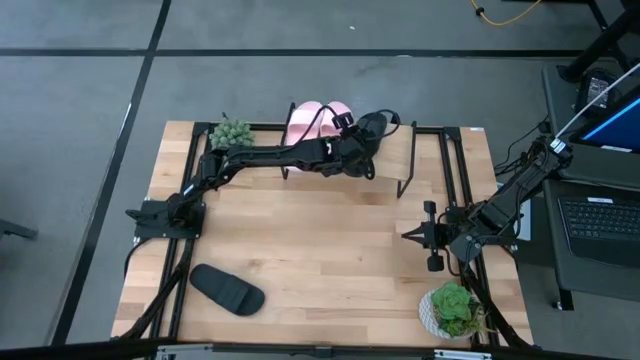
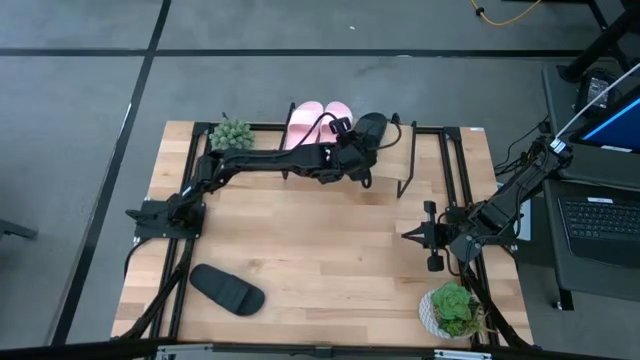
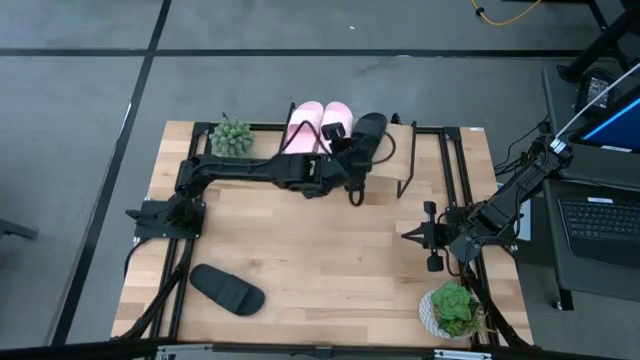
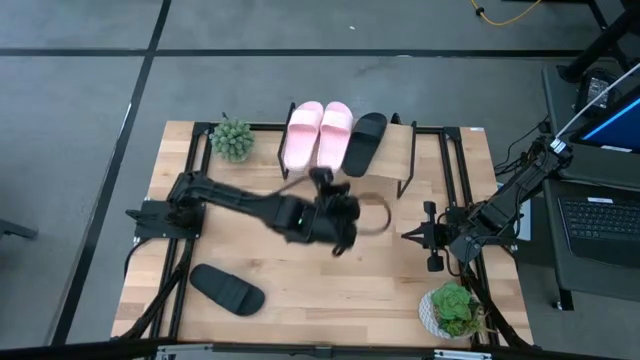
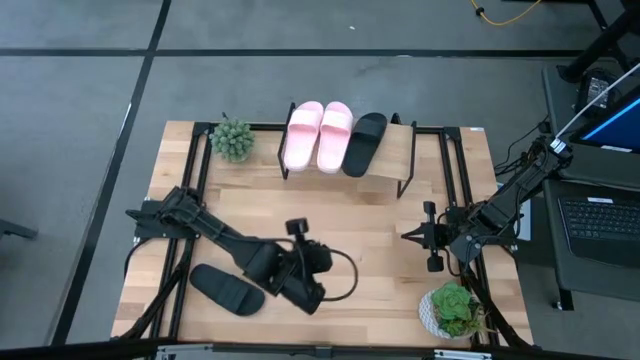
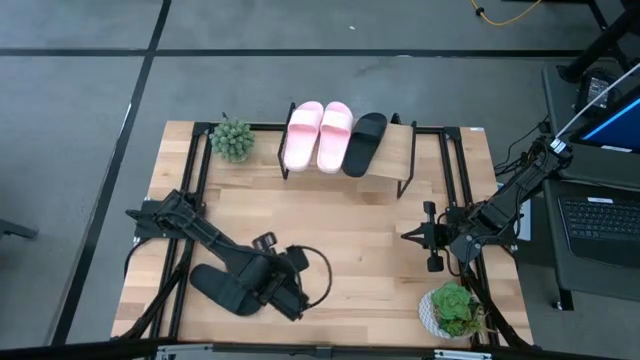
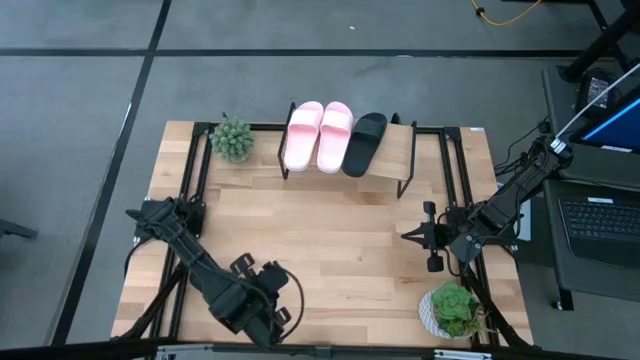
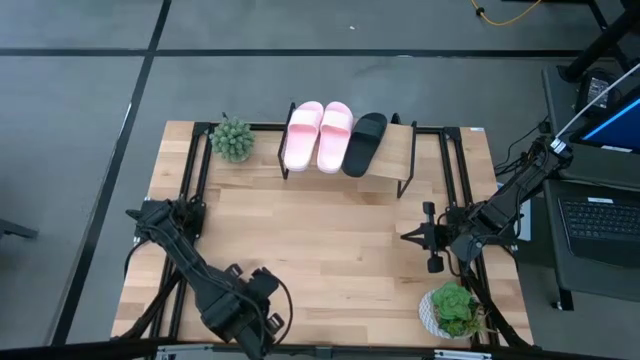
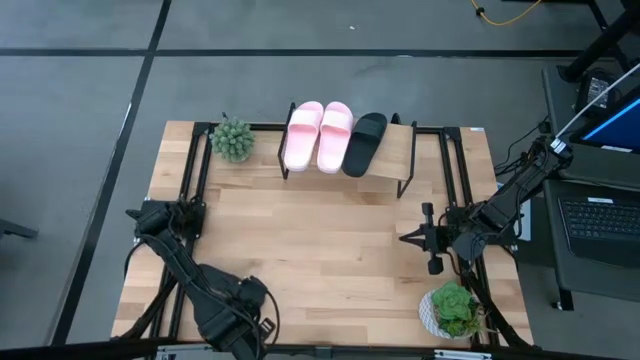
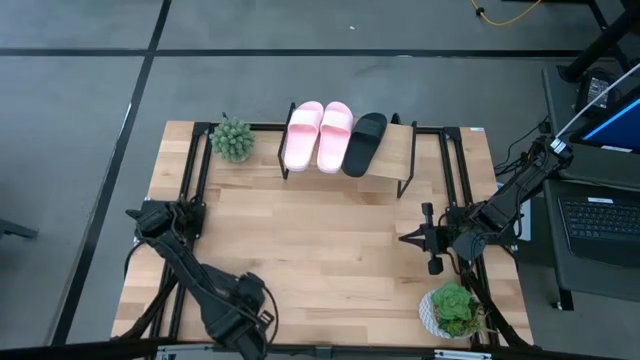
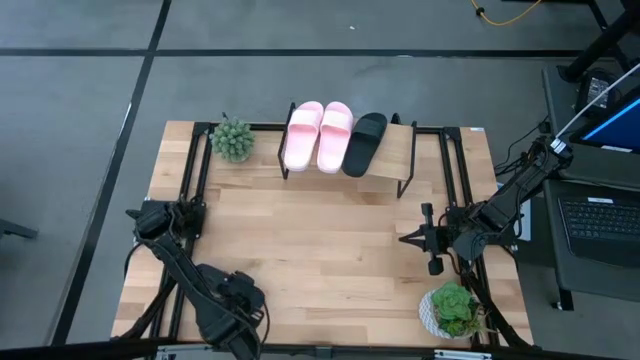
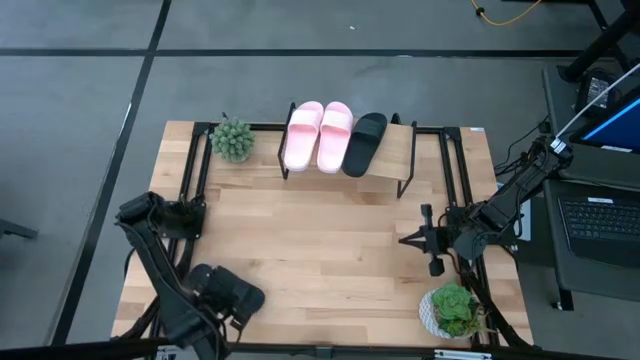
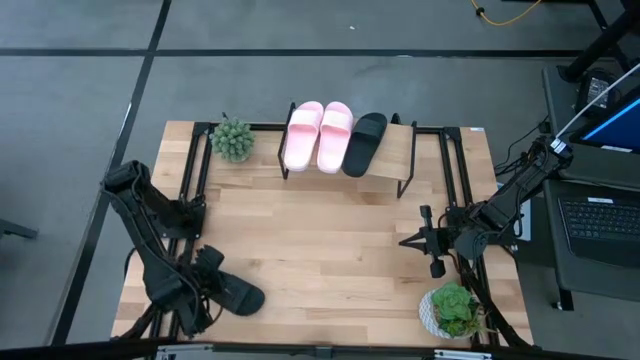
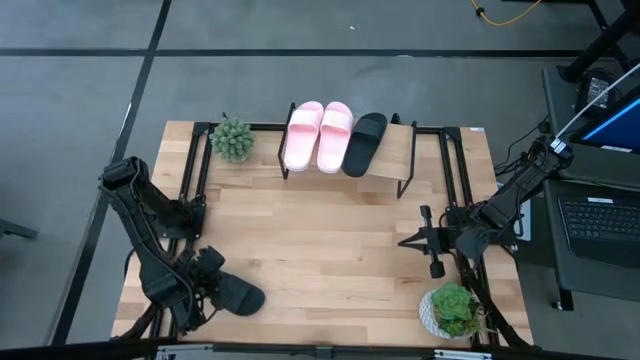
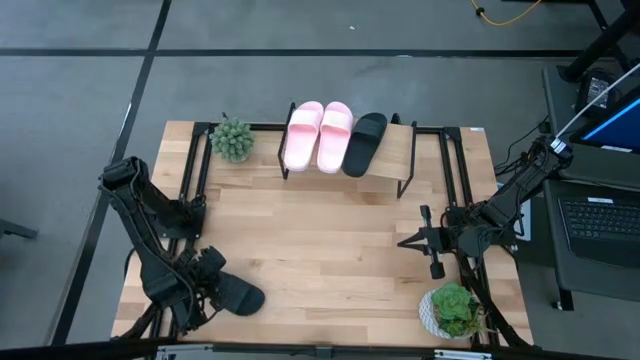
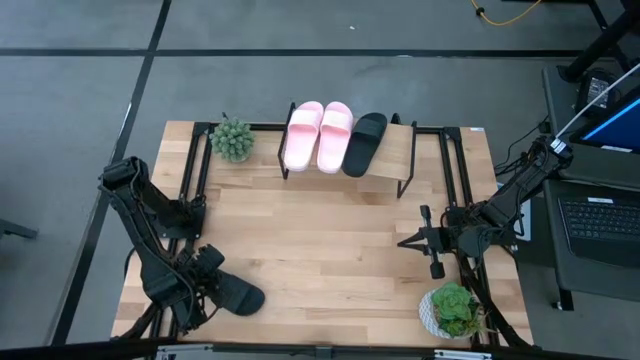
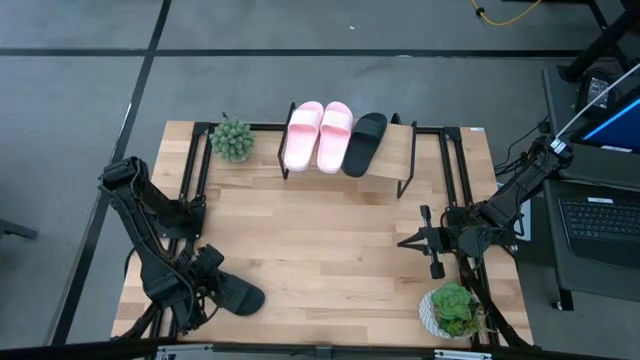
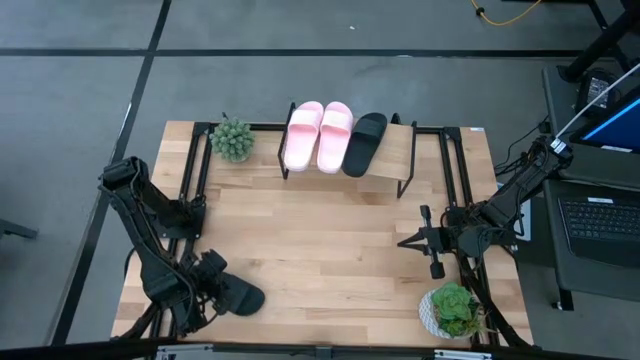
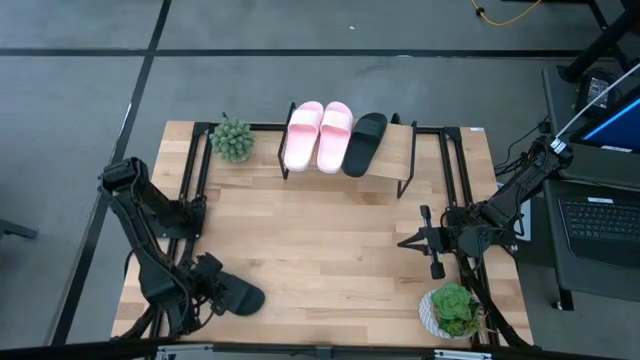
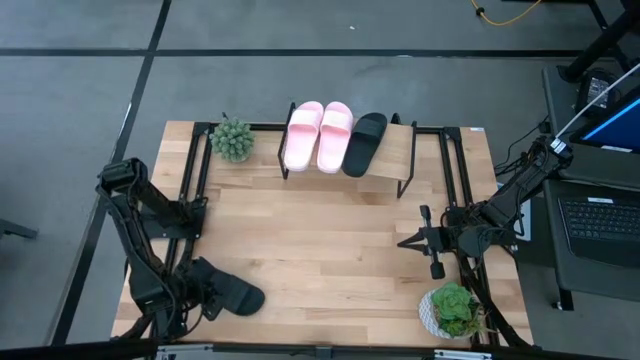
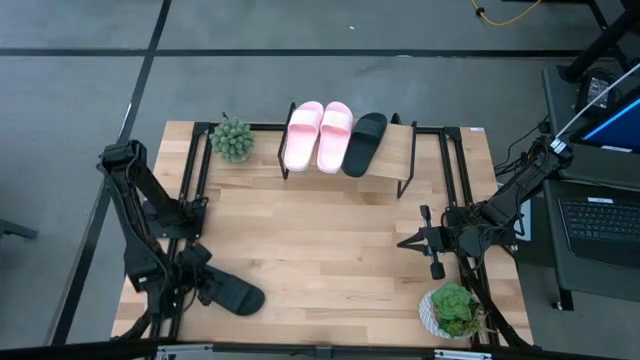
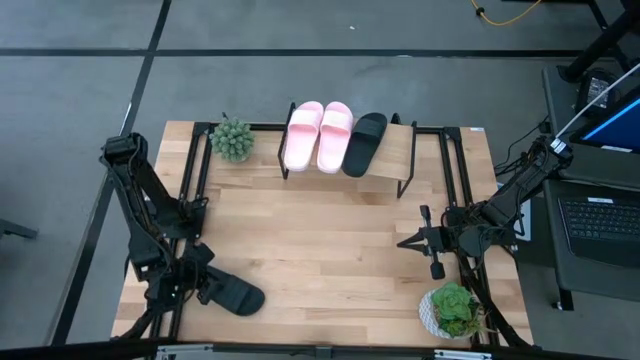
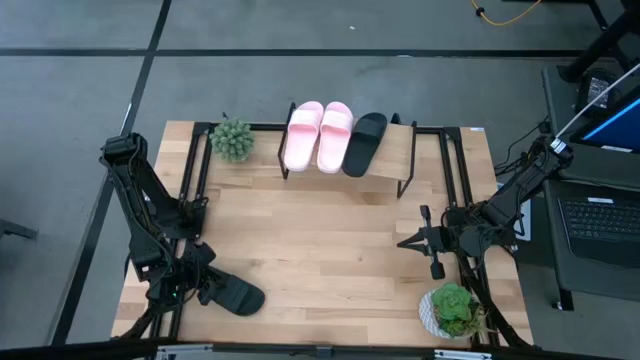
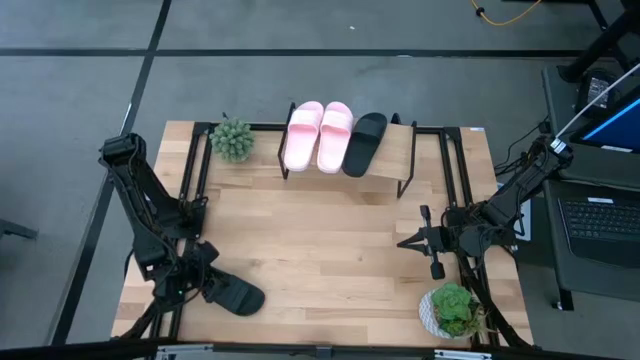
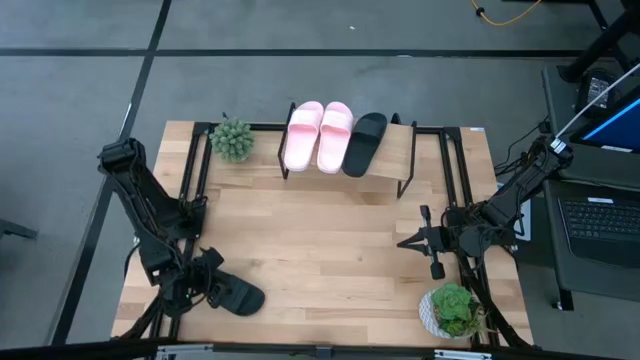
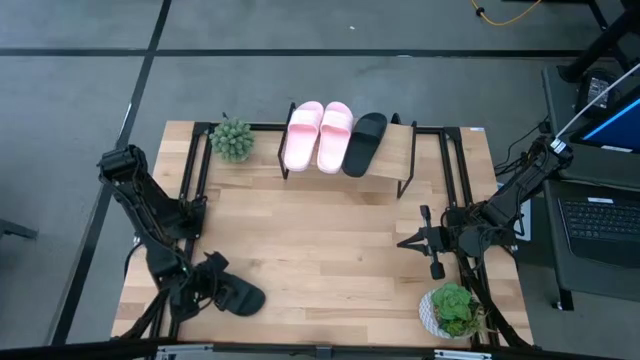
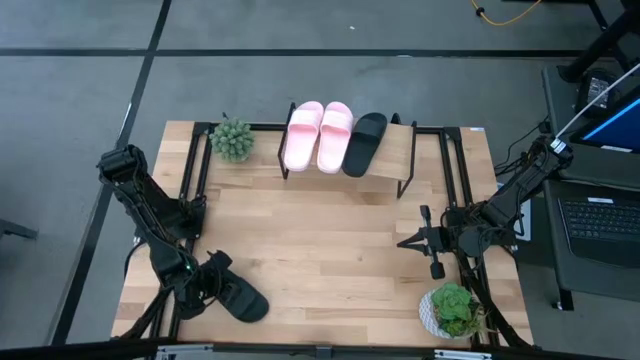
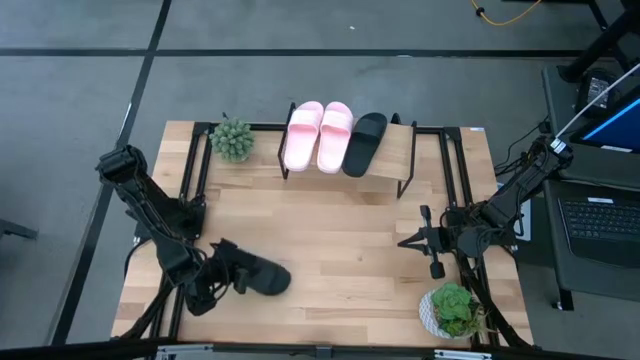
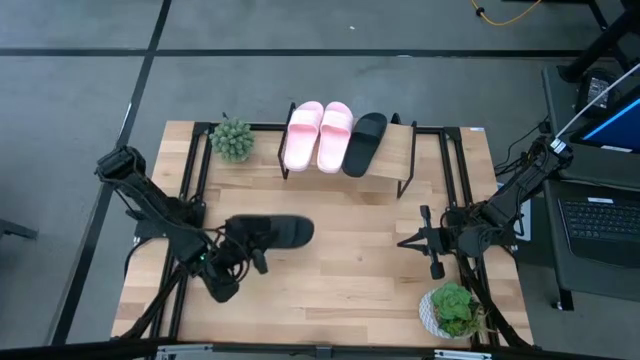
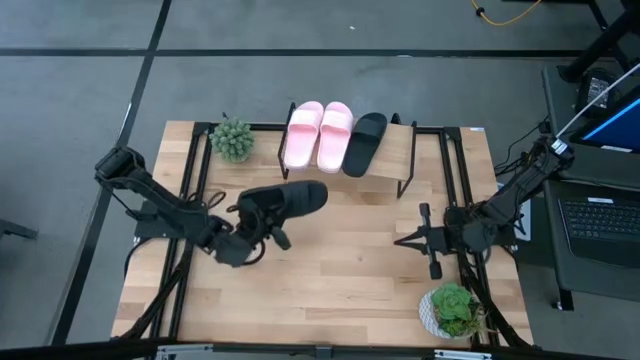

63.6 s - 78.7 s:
Task: Pick and place slides into the shelf
Put the black slipper on the shelf

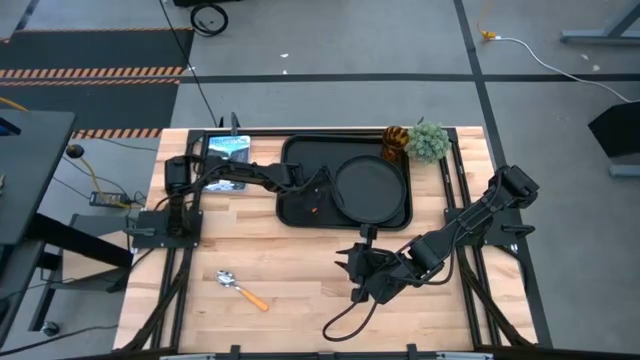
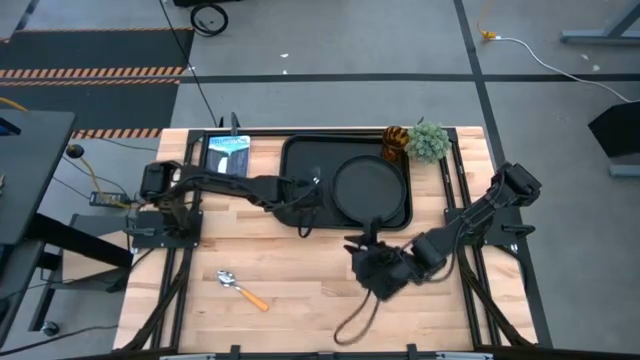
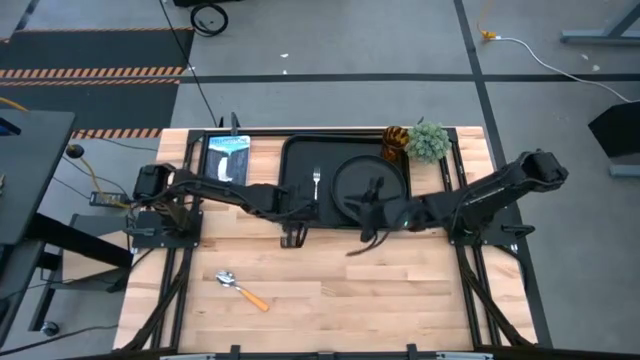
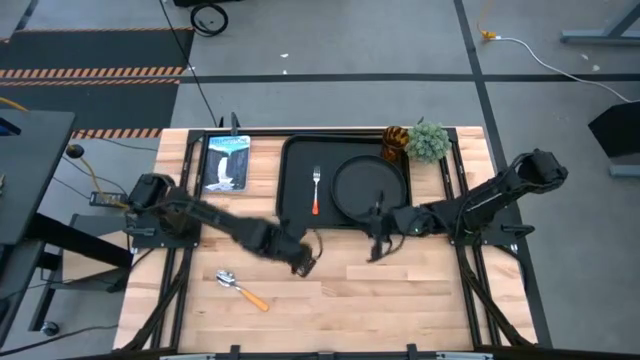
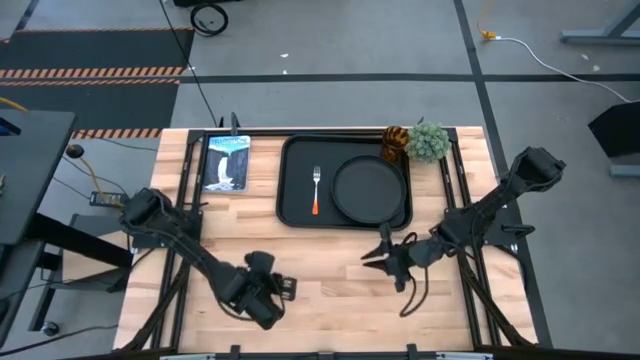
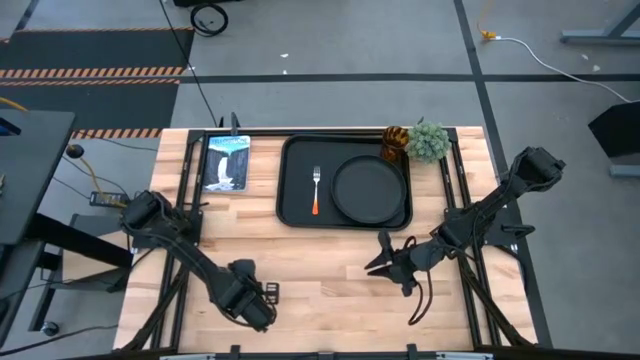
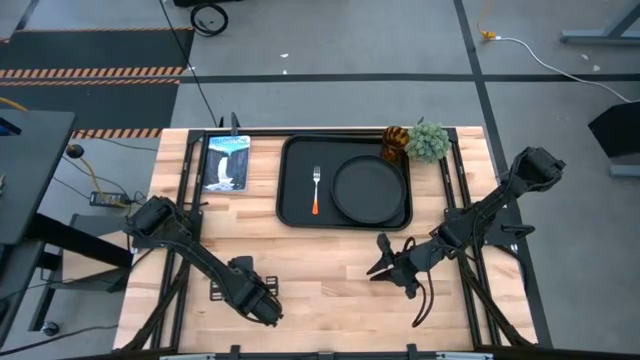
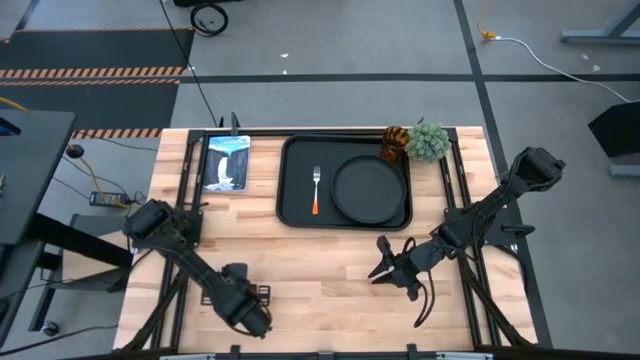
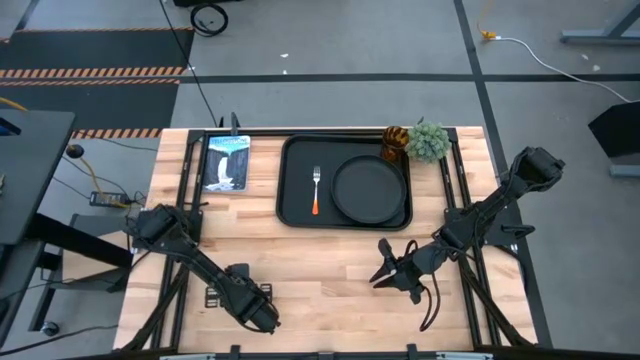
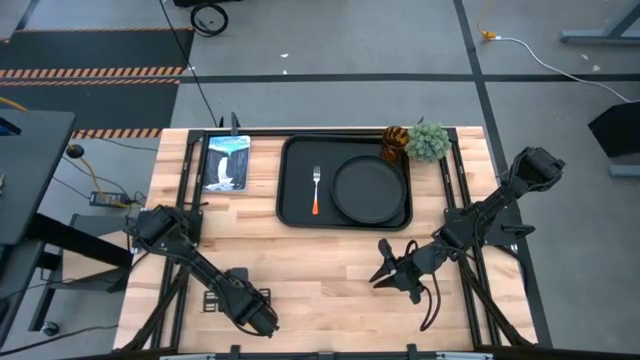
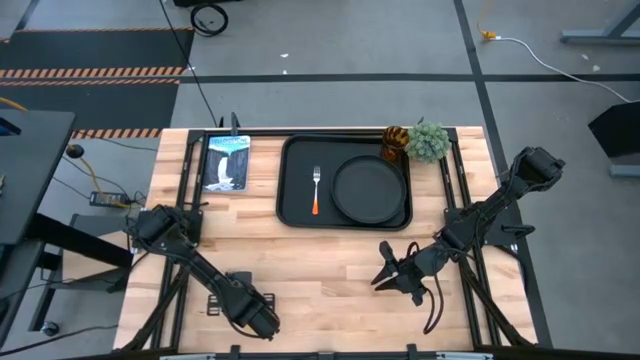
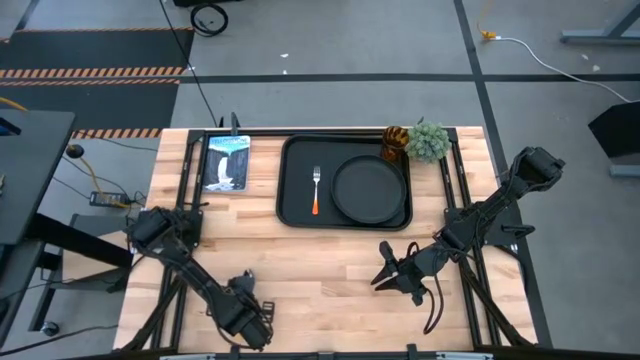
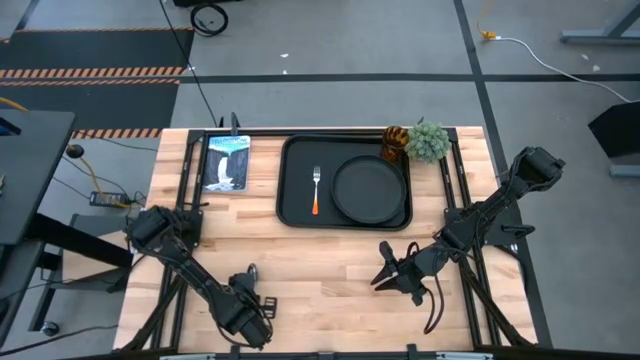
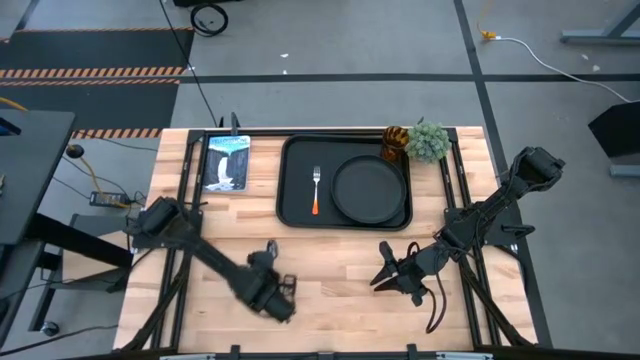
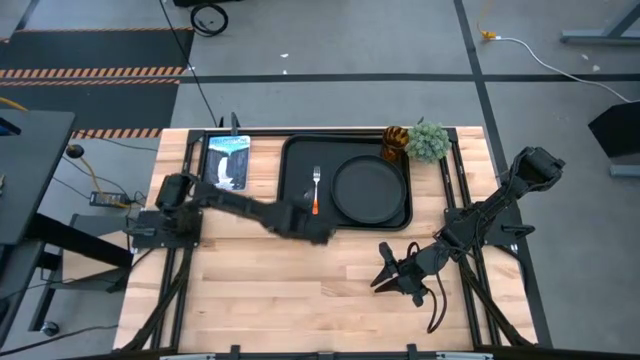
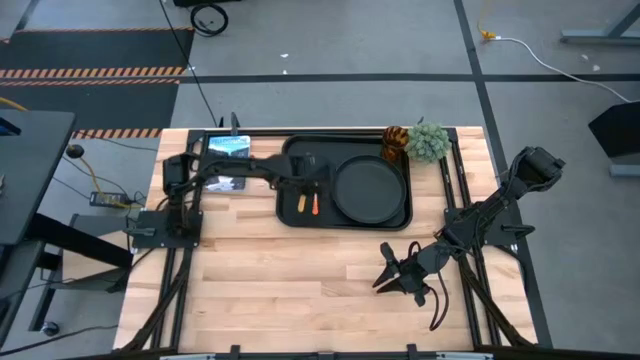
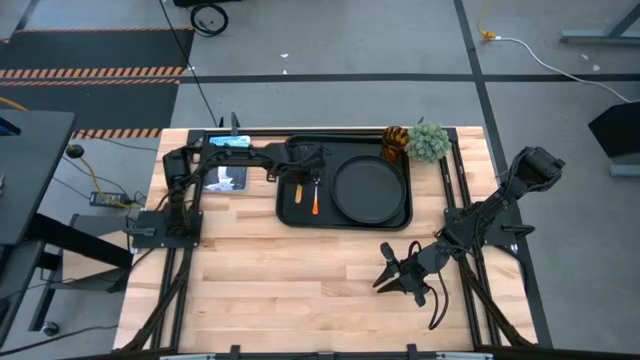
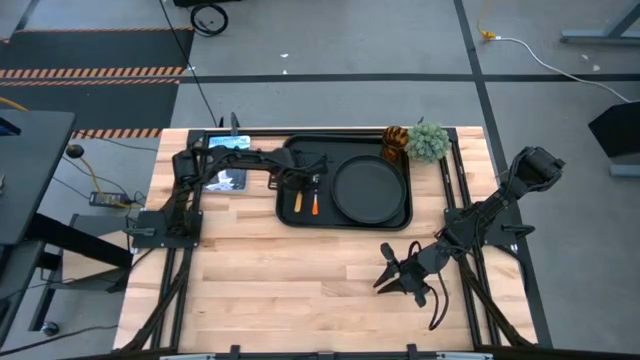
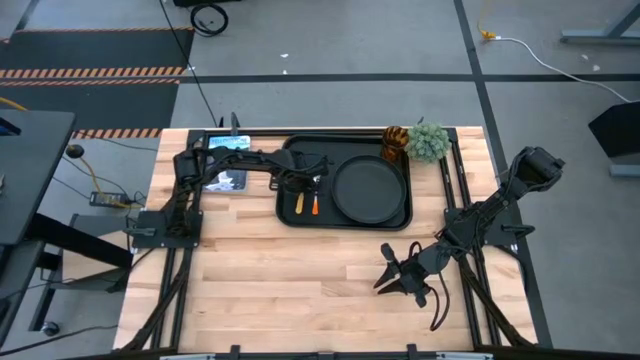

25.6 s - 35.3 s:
Task: Pick and place plate/cup/fork/spoon on tray
Put the yellow spoon on the black serving tray to the left of the orange fork
